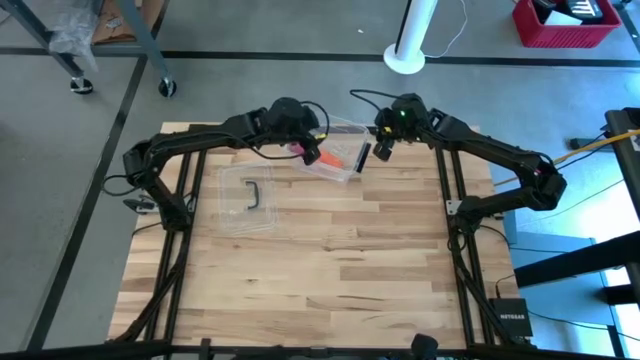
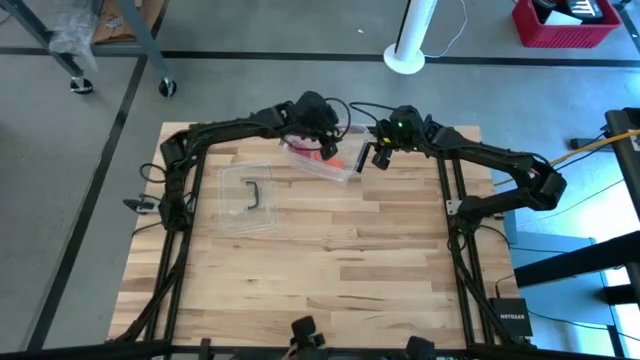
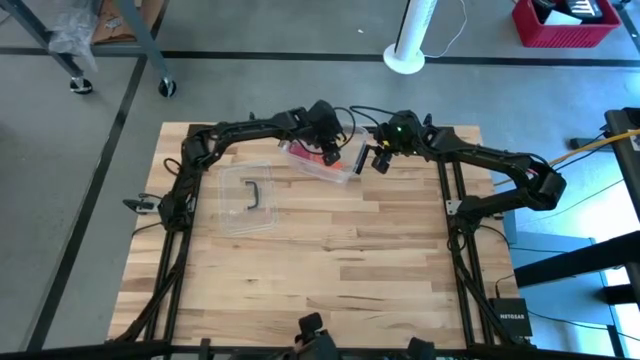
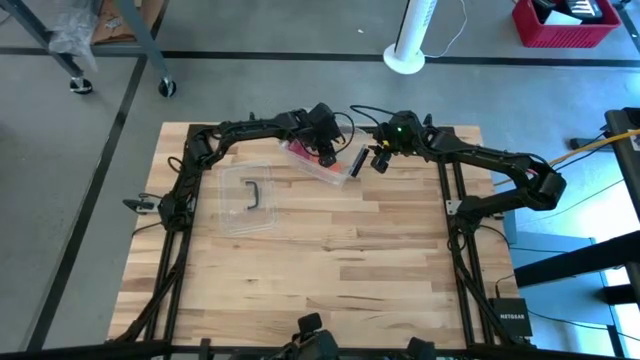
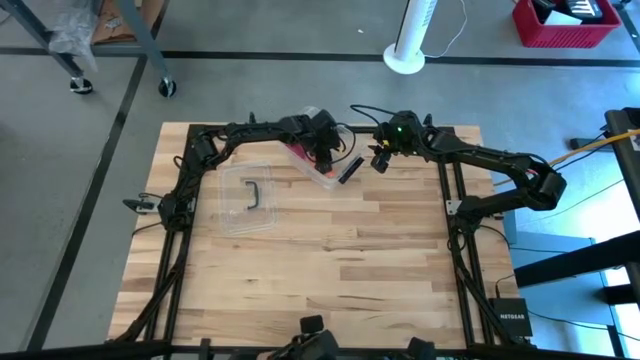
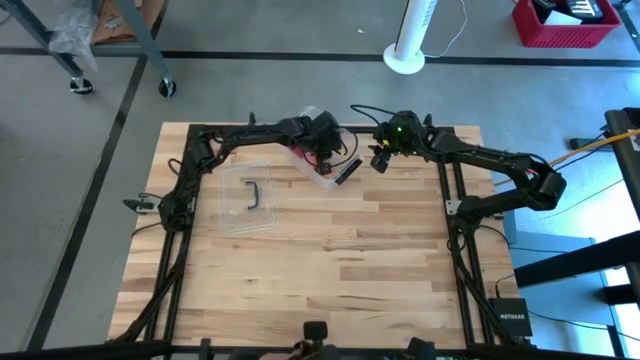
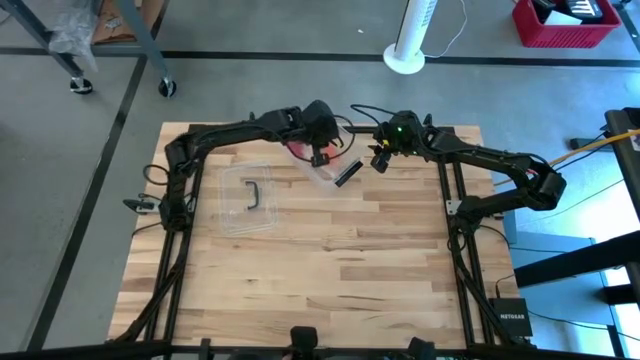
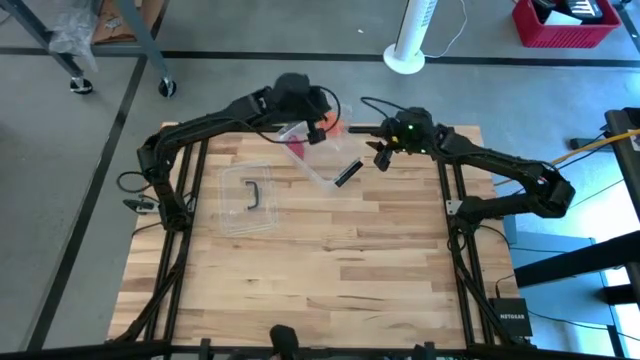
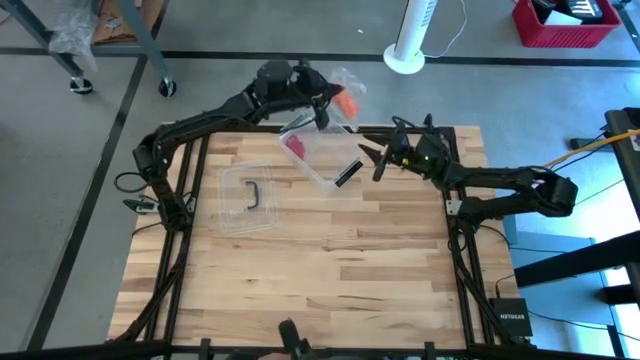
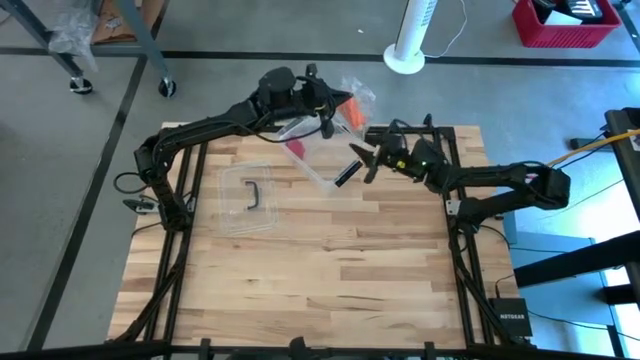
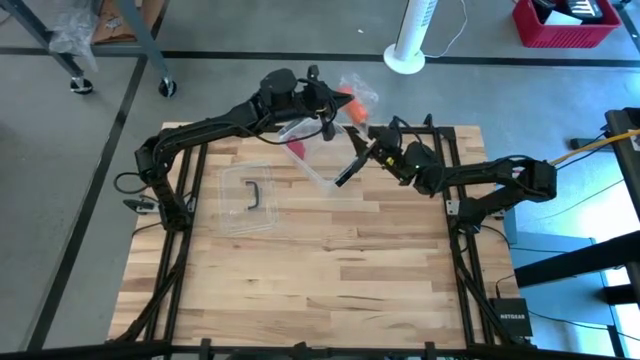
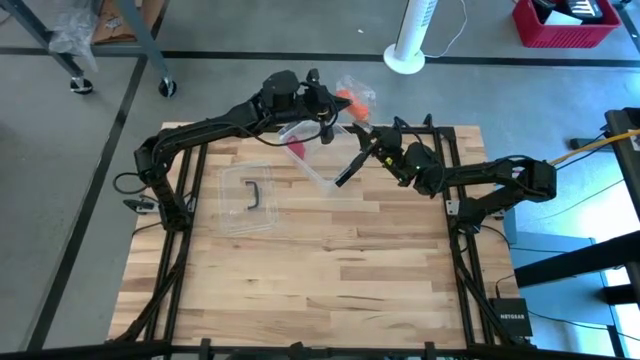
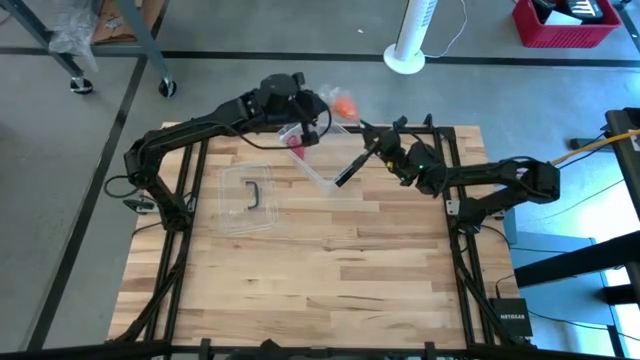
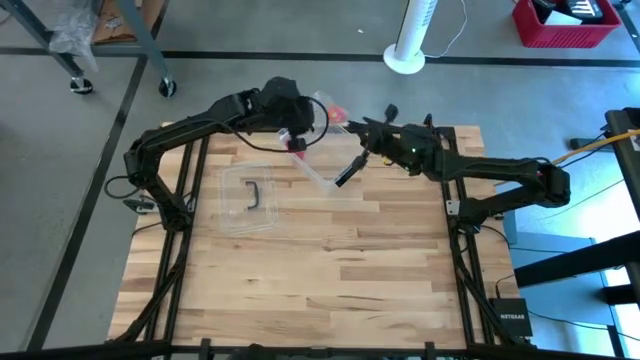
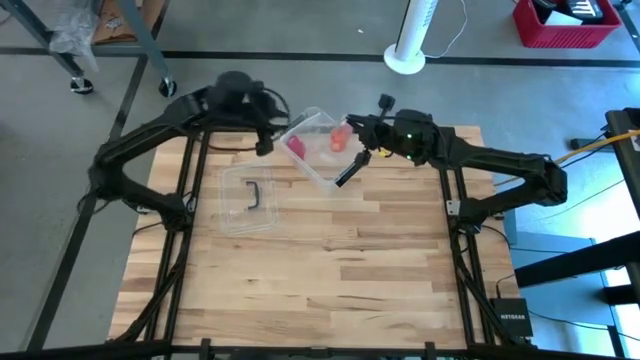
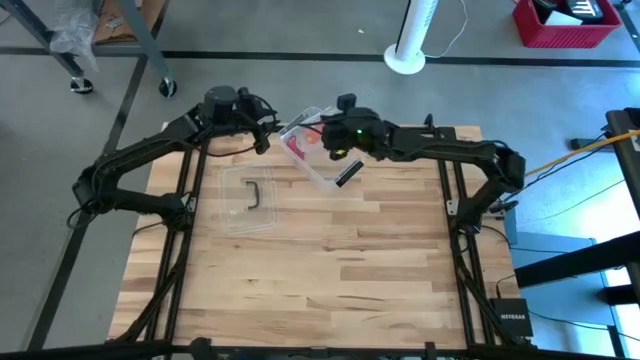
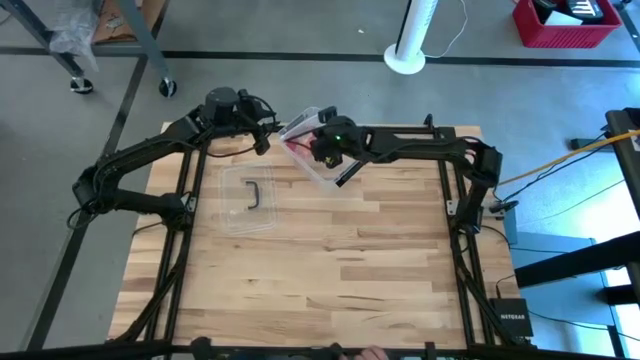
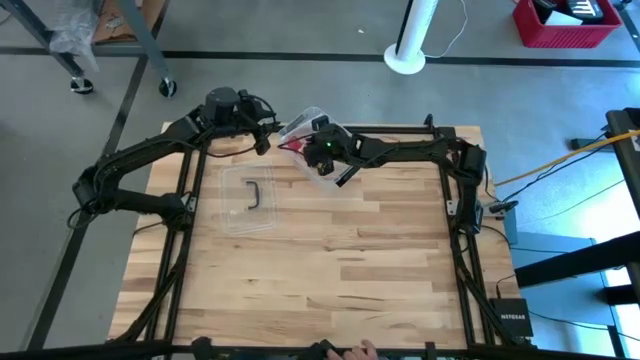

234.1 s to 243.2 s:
Task: Roll bandage
Adjust the transparent zip bag with the orange bandage in the transparent container

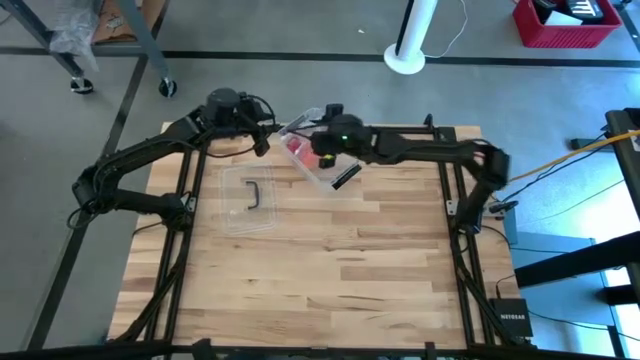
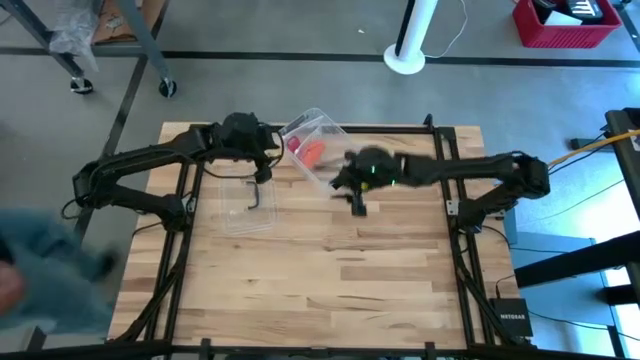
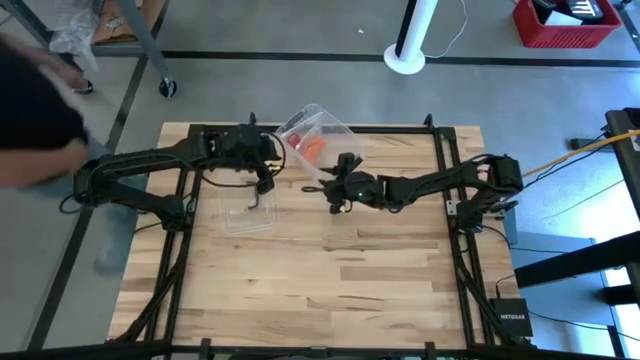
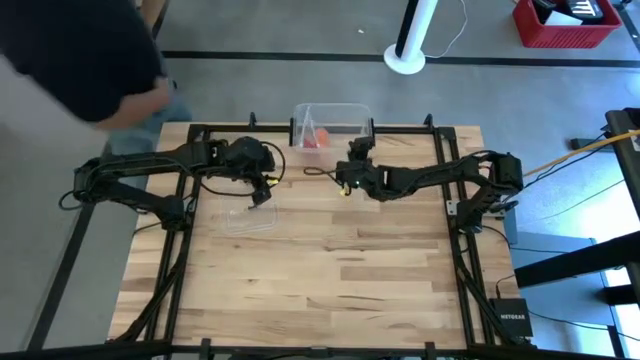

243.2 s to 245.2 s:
Adjust the transparent container

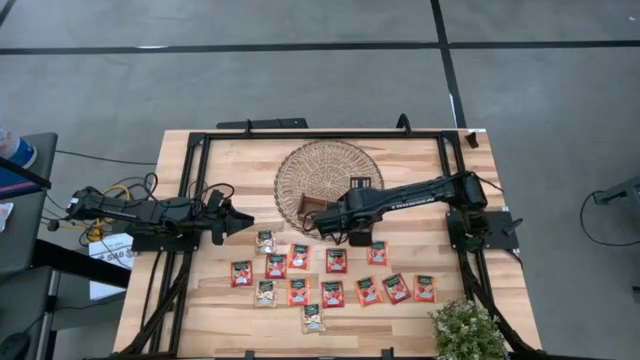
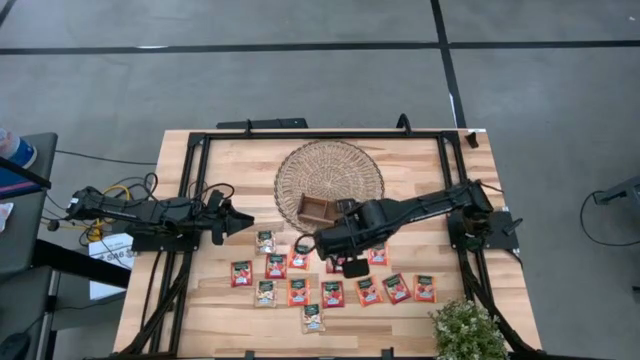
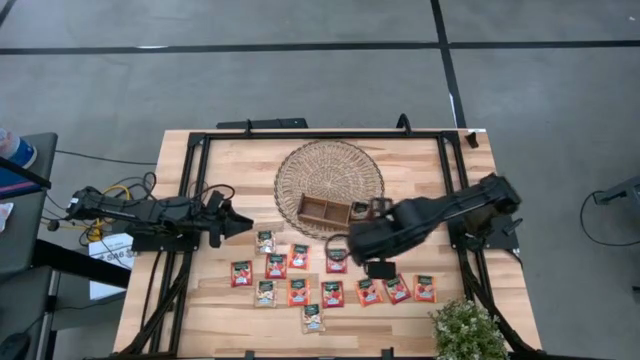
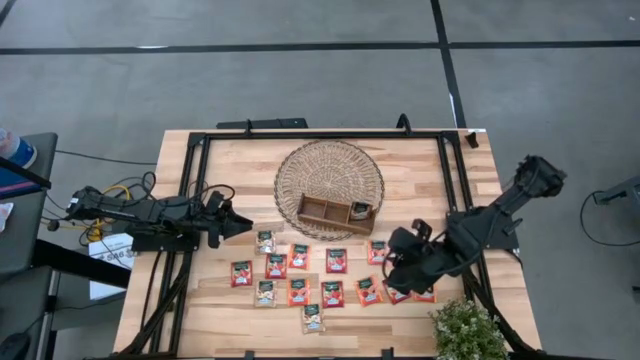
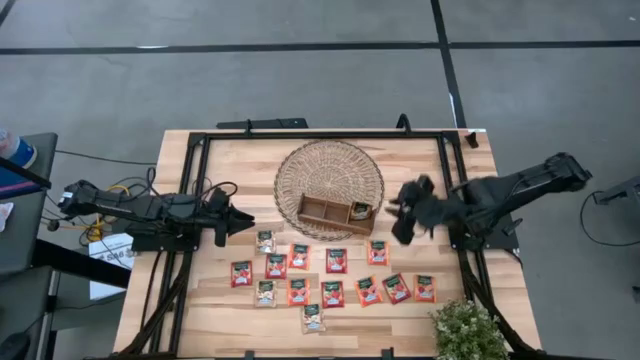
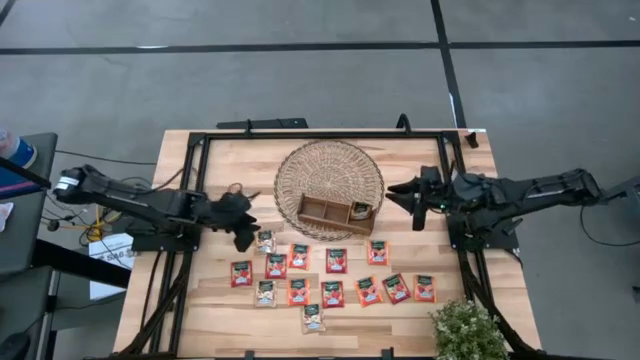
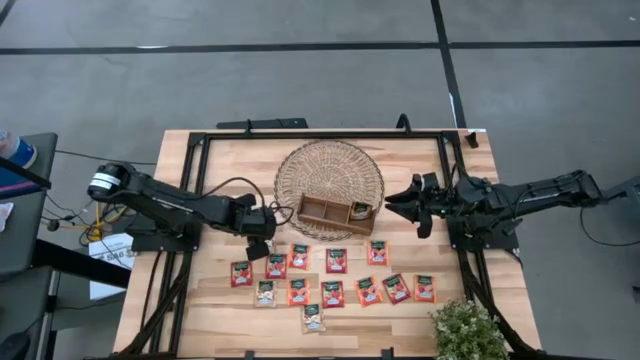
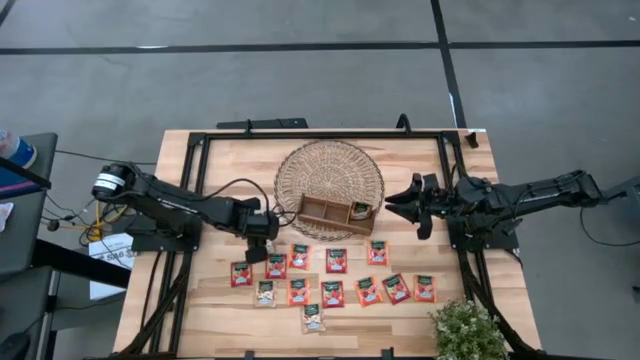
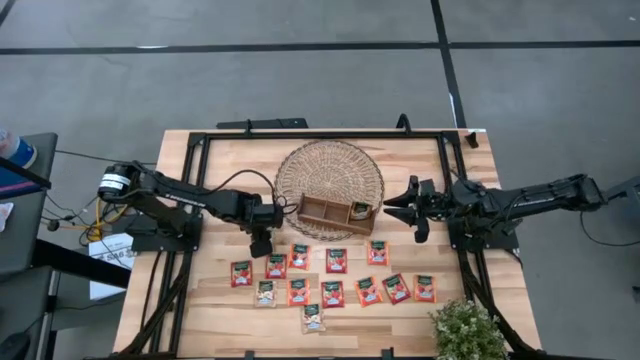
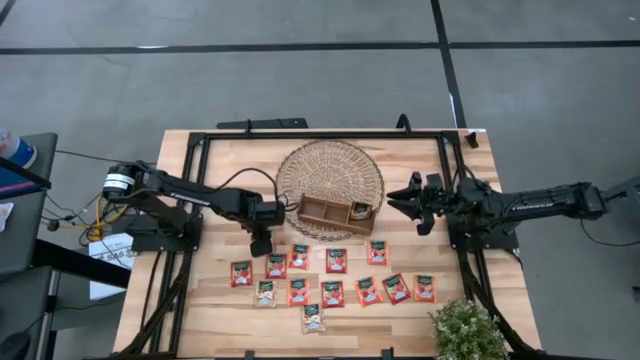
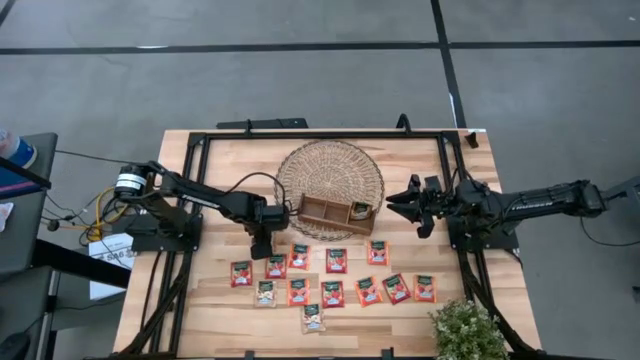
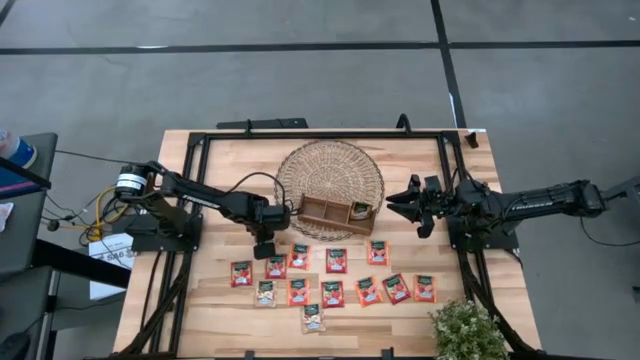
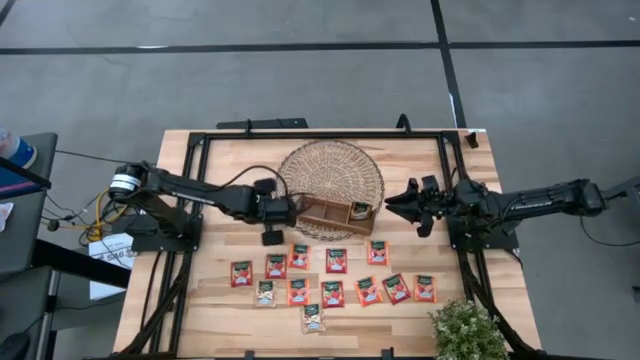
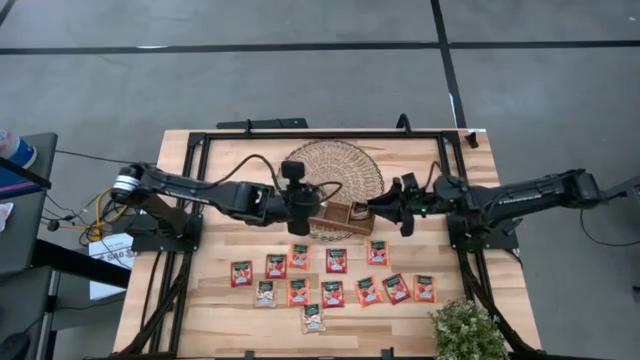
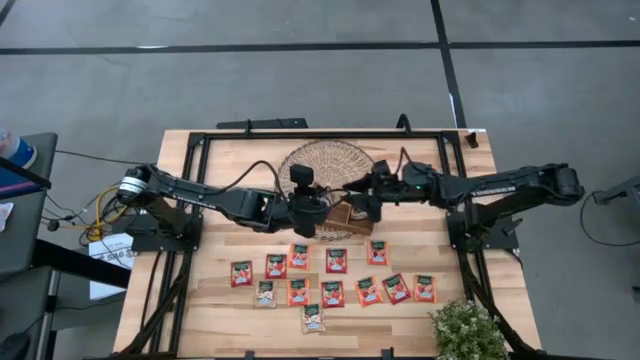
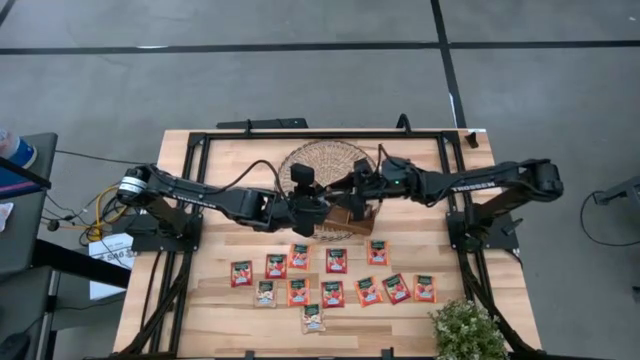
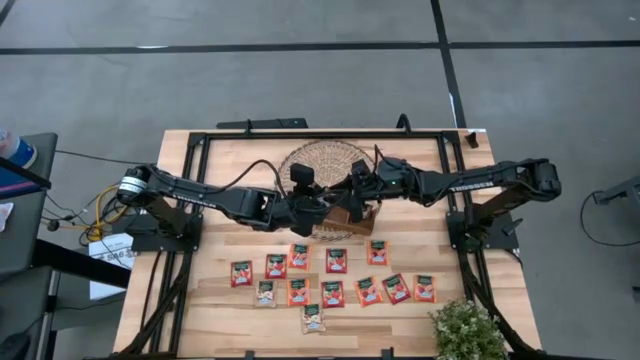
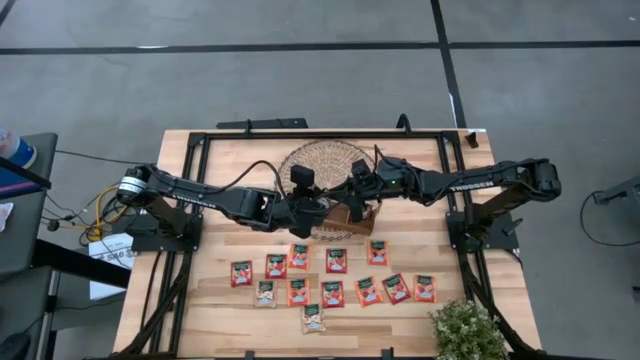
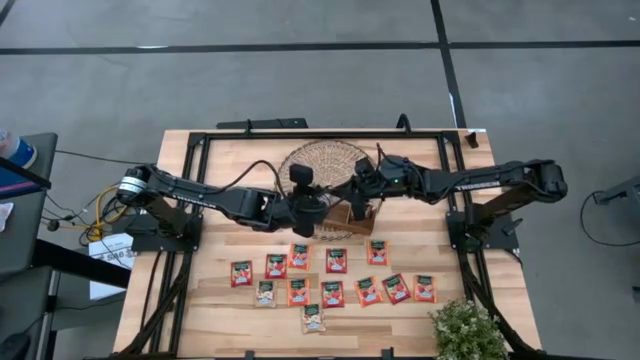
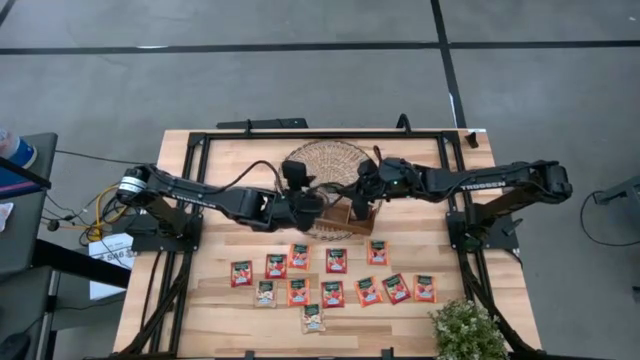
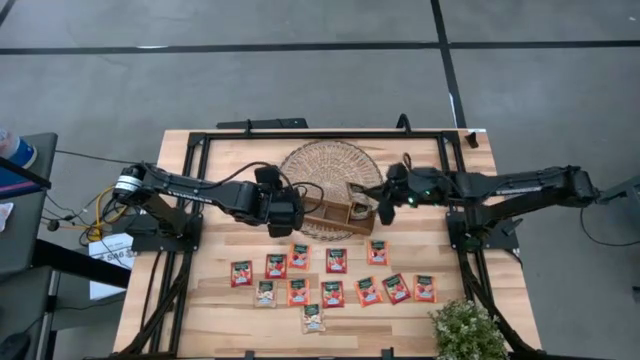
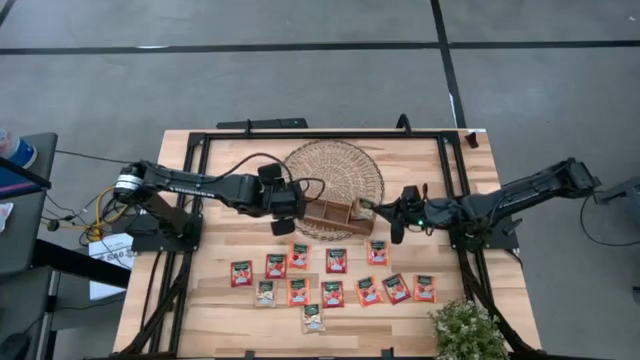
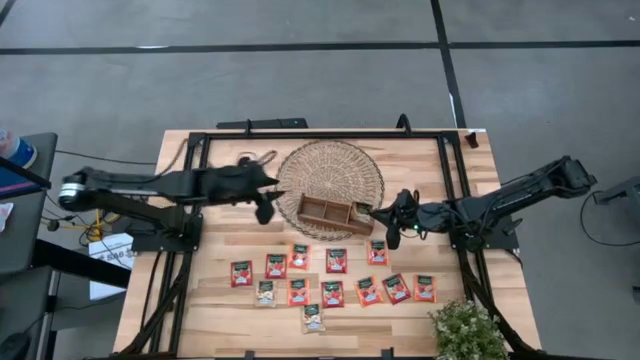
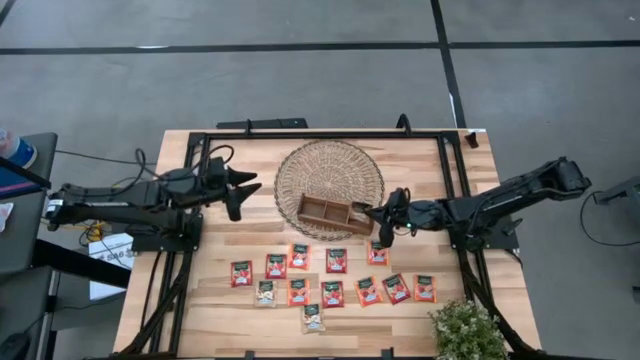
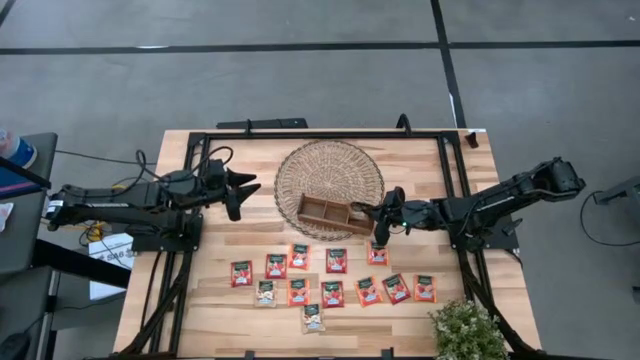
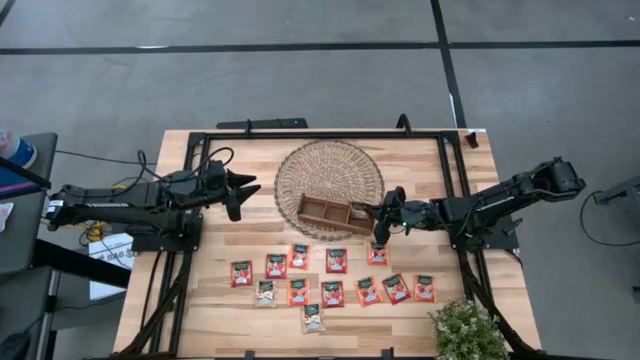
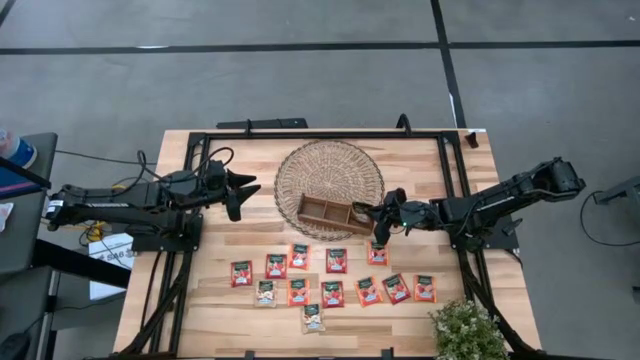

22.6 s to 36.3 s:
Task: Pick & Place Tea
Put the brown tea bag into the right section of the wooden organizer
